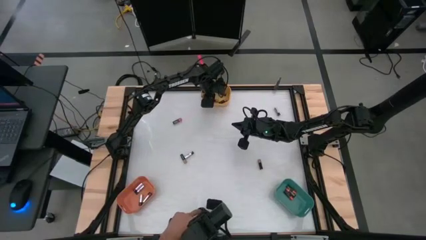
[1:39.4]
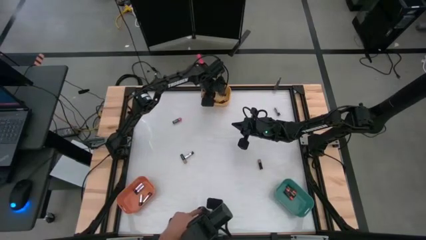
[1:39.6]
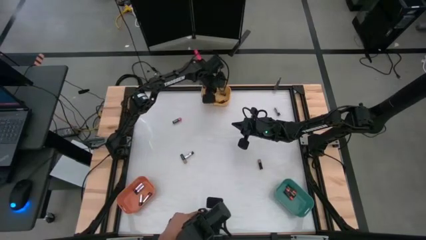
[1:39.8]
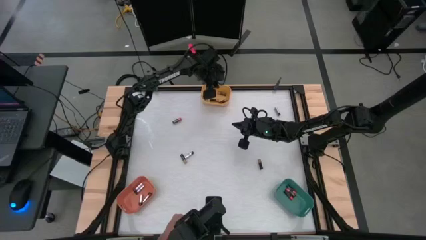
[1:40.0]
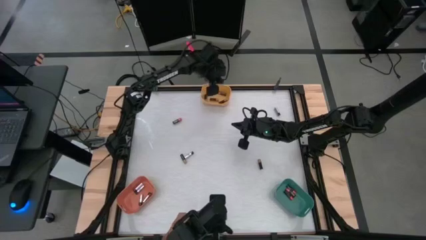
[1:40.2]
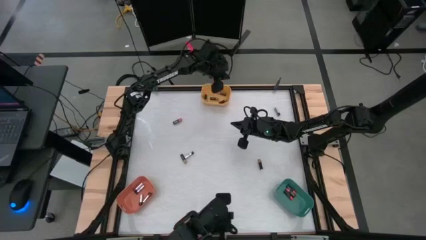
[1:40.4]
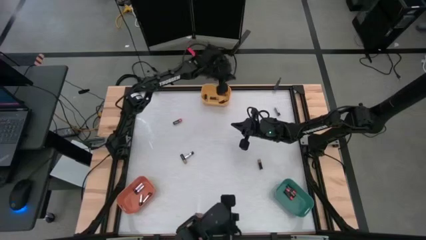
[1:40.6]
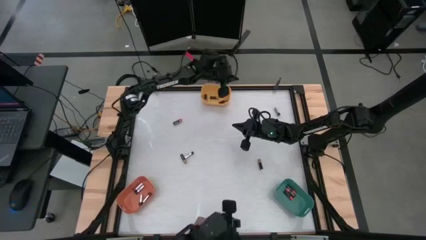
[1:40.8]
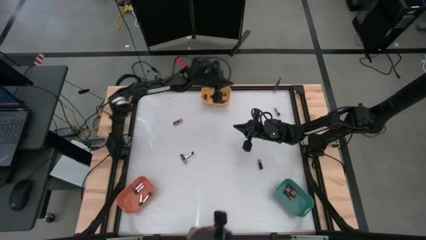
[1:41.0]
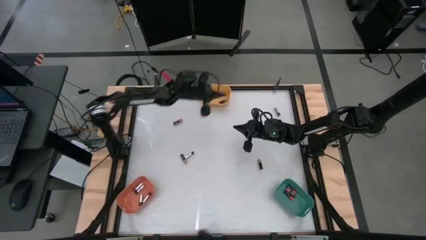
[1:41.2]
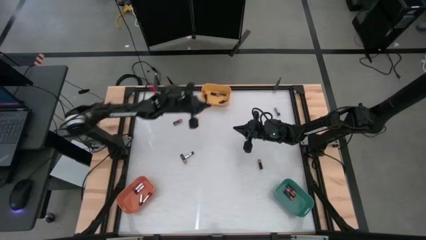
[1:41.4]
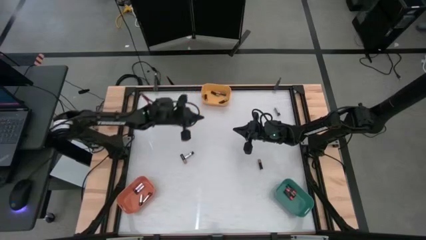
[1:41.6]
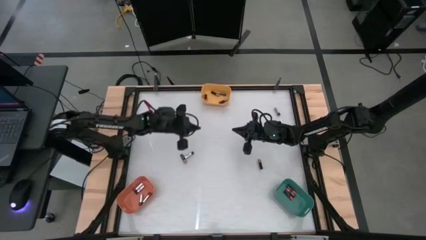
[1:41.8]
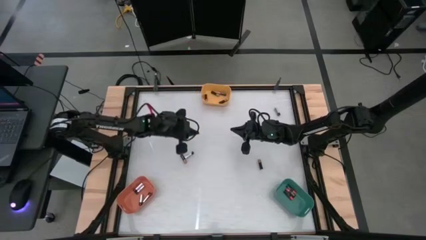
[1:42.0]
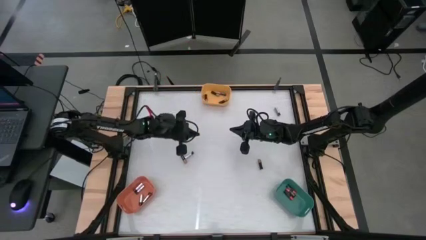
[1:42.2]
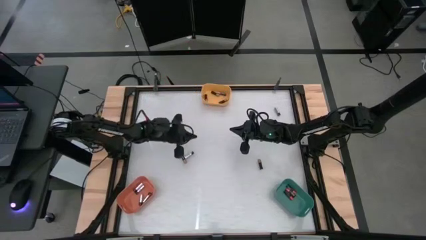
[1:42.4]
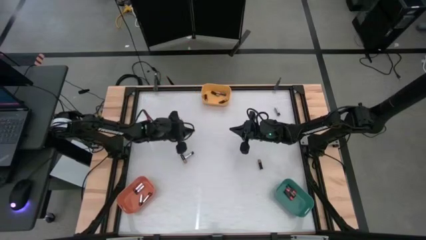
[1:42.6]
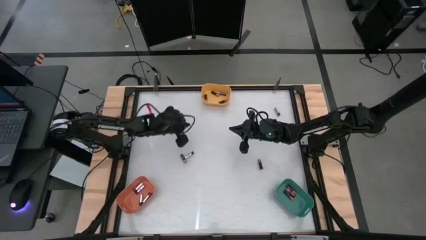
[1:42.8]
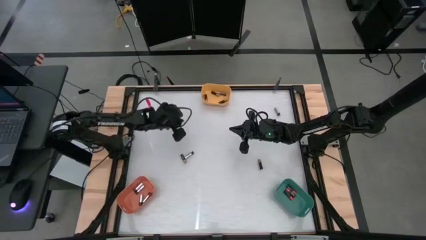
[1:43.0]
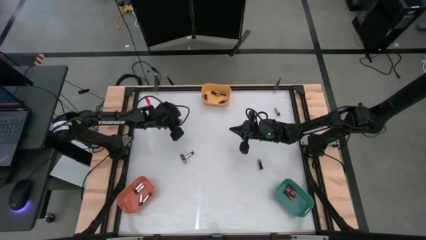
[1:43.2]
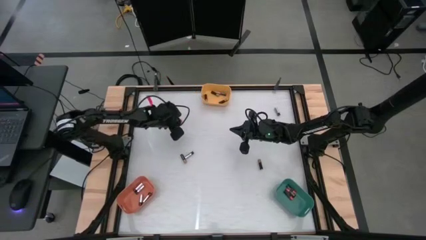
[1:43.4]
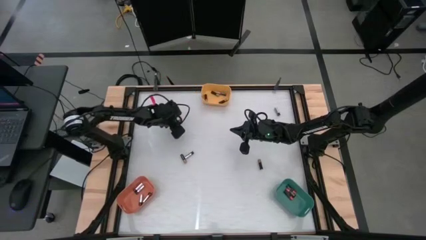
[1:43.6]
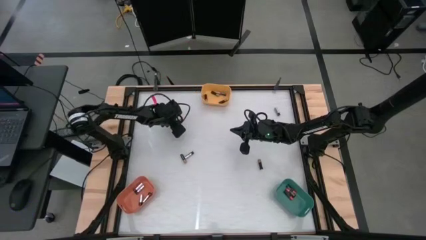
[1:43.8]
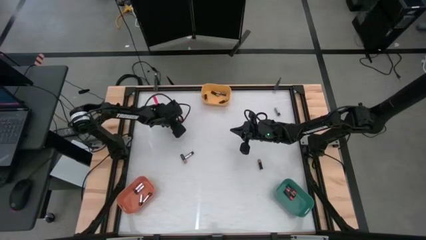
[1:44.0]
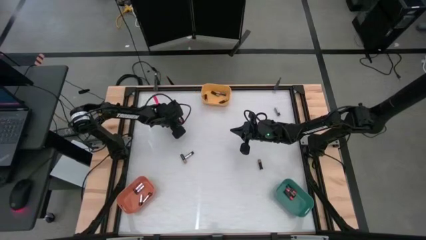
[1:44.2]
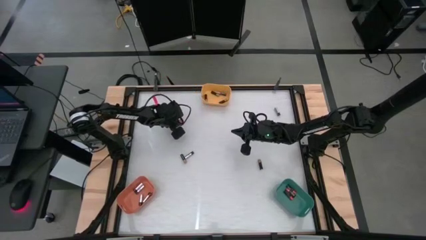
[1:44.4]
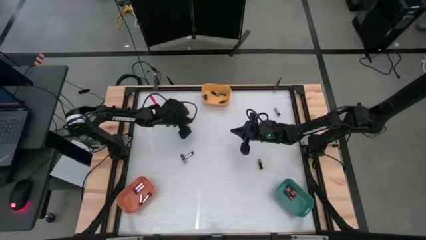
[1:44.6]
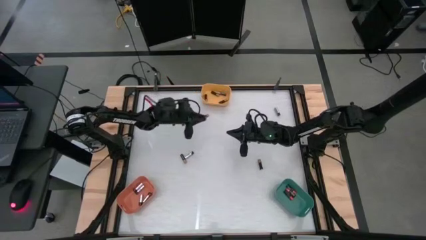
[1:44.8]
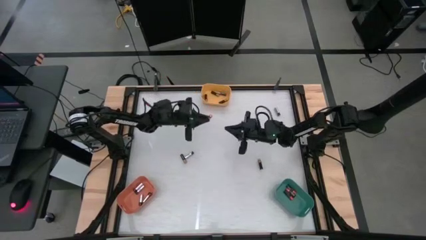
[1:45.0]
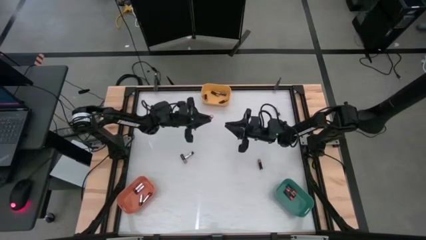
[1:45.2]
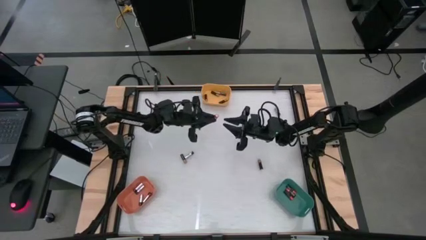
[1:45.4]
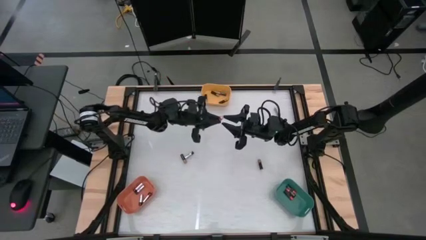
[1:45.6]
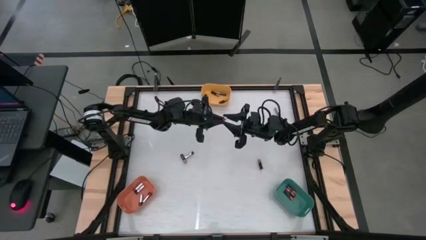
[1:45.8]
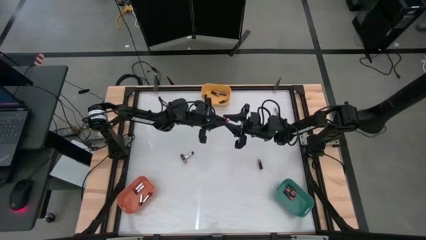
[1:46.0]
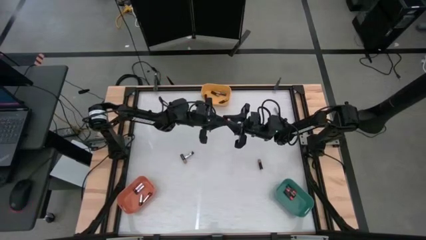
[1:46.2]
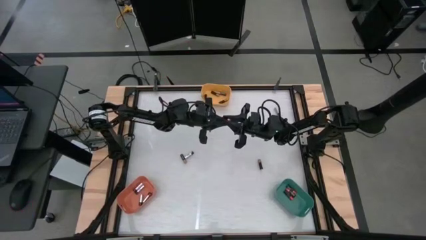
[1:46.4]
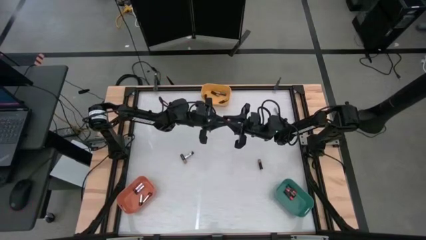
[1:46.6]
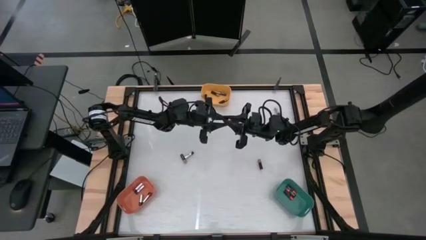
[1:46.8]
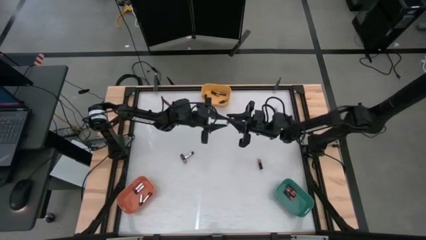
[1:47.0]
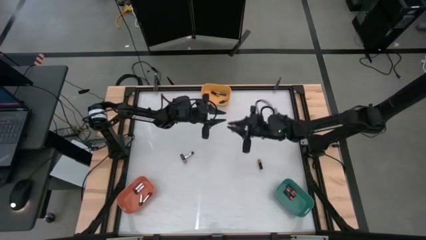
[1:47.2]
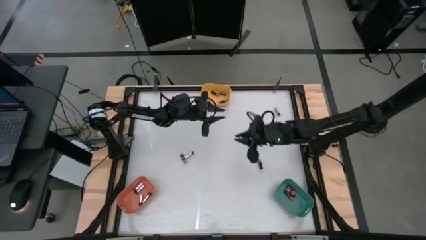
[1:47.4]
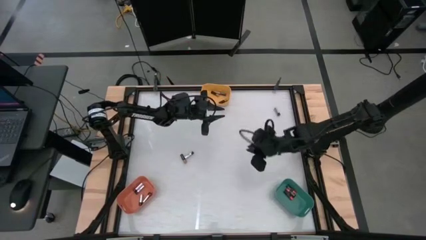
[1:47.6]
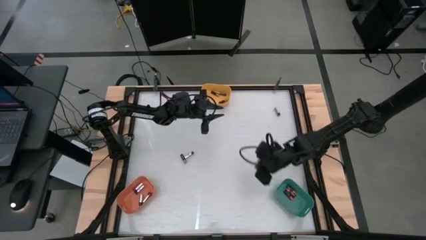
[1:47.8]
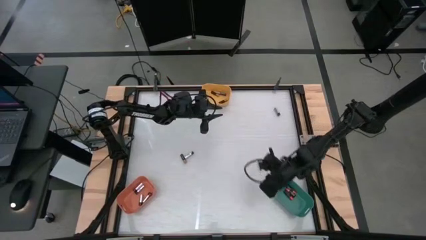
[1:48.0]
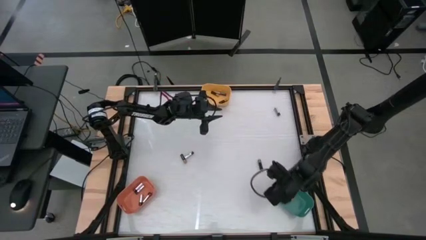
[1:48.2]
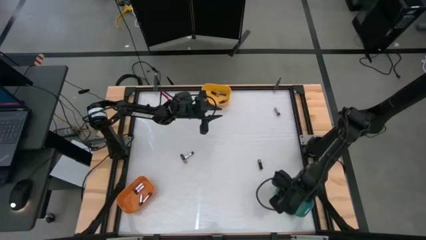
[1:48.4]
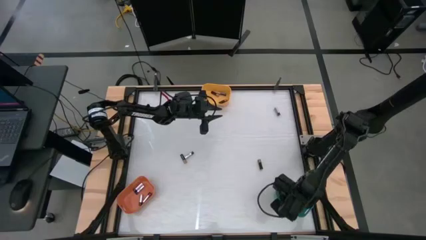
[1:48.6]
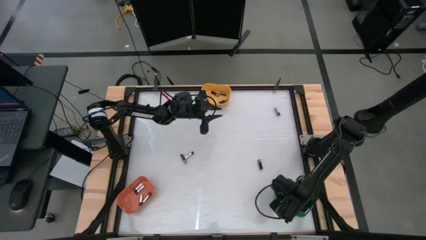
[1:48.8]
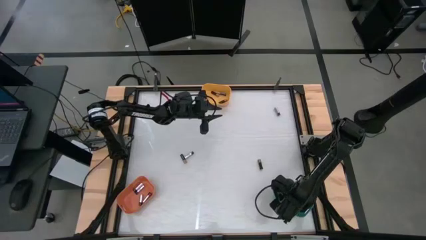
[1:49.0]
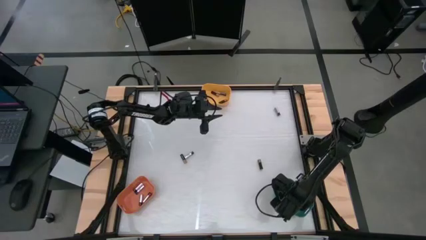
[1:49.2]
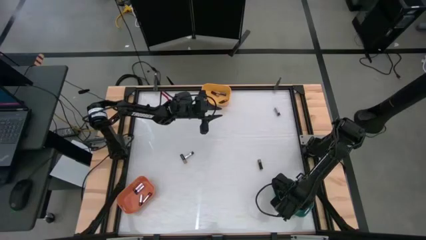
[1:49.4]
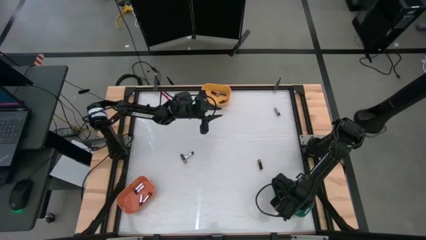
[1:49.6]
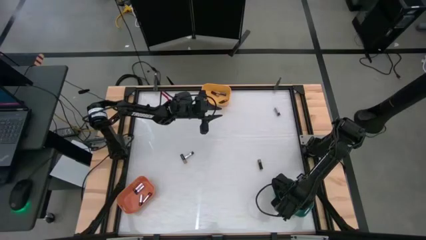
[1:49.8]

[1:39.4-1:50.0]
Task: Sort batteries
Put the black-red battery into the green bin

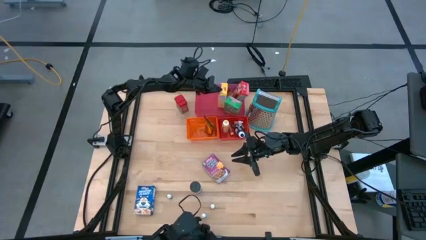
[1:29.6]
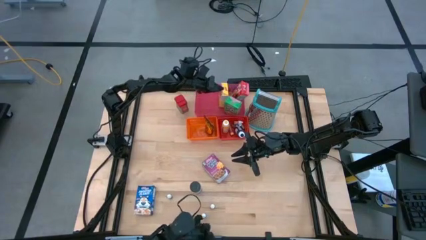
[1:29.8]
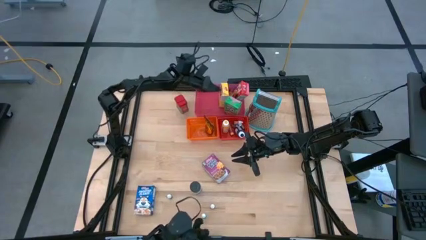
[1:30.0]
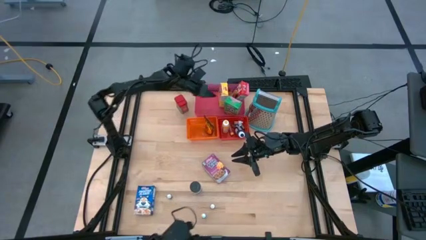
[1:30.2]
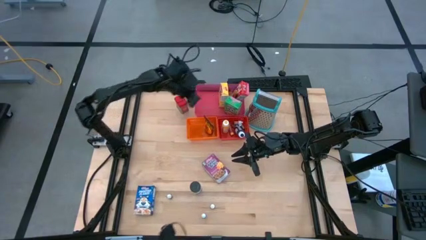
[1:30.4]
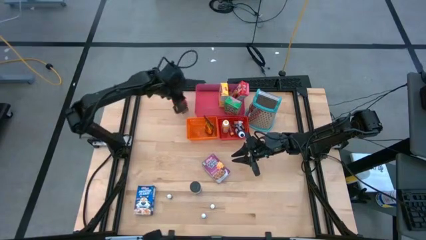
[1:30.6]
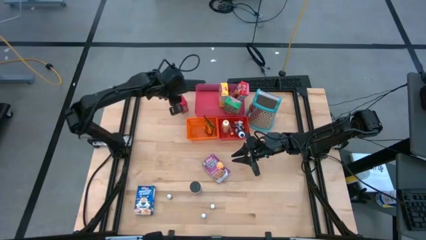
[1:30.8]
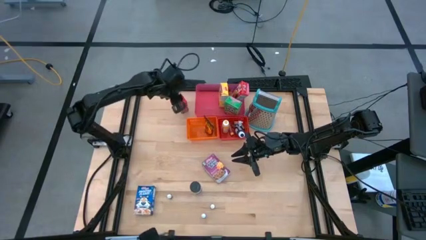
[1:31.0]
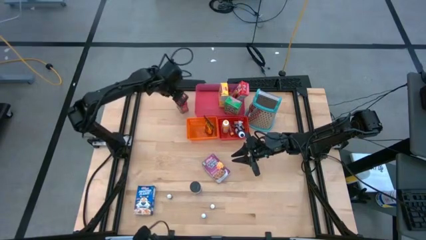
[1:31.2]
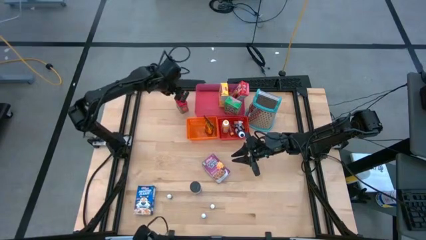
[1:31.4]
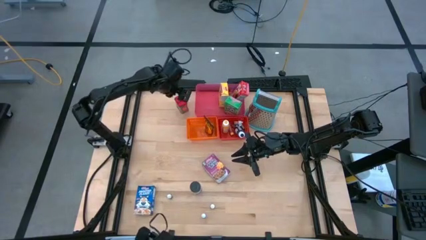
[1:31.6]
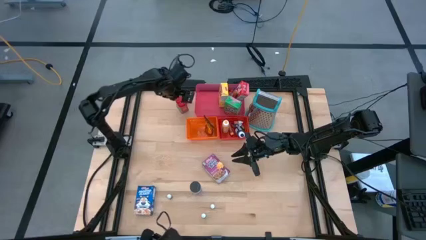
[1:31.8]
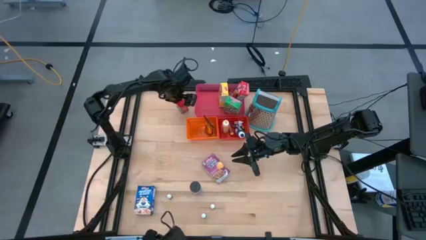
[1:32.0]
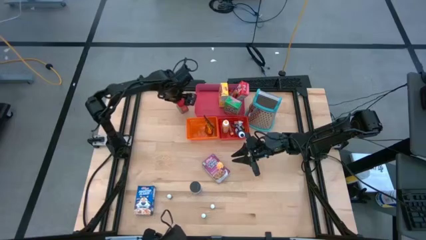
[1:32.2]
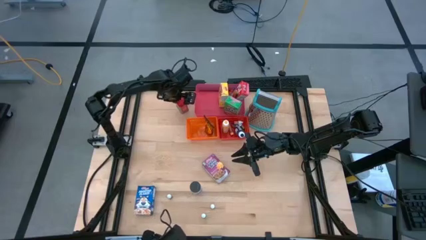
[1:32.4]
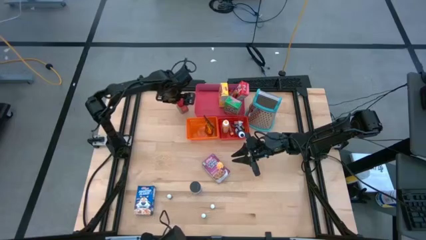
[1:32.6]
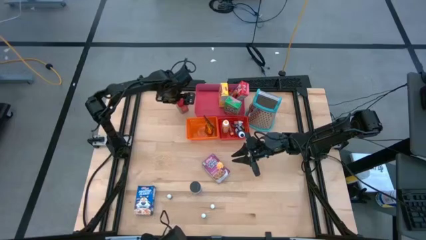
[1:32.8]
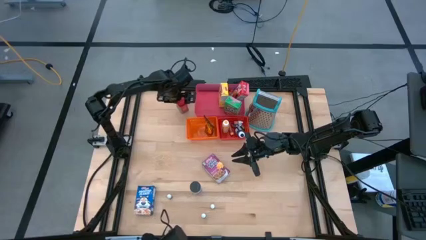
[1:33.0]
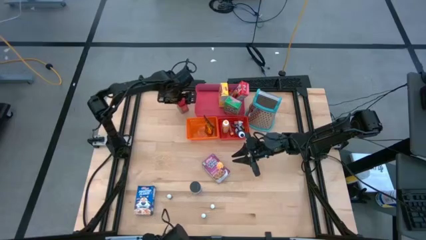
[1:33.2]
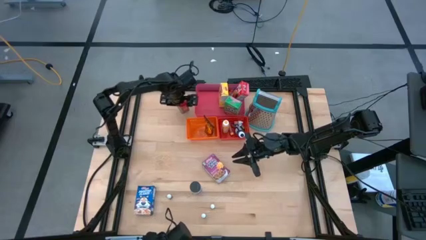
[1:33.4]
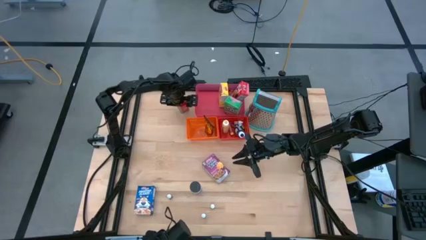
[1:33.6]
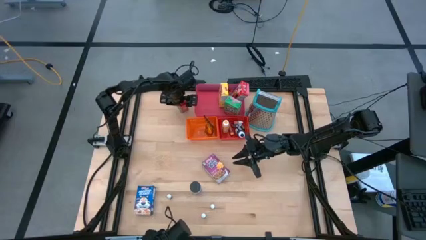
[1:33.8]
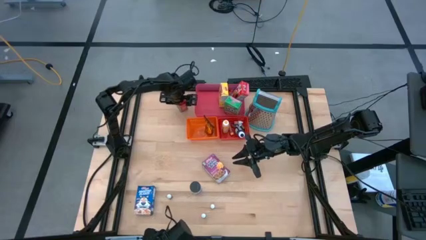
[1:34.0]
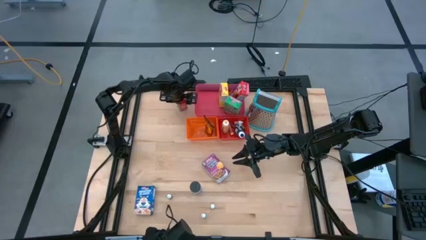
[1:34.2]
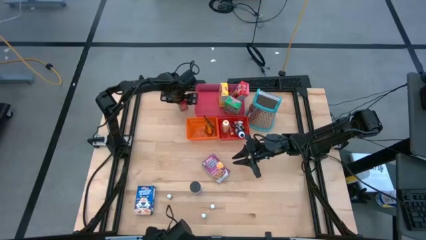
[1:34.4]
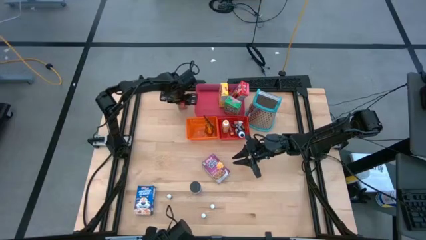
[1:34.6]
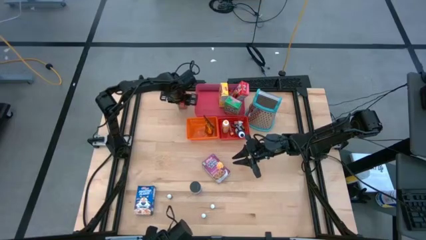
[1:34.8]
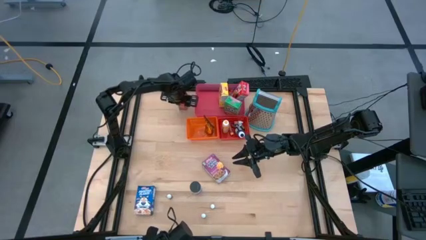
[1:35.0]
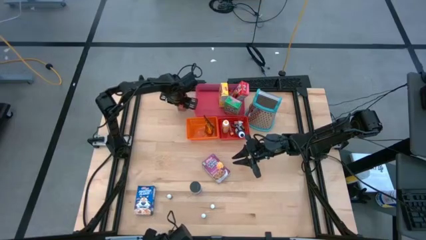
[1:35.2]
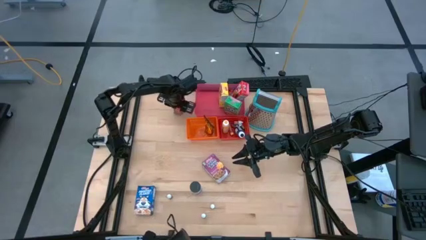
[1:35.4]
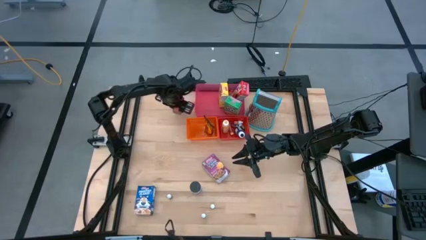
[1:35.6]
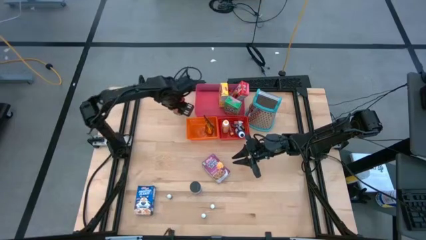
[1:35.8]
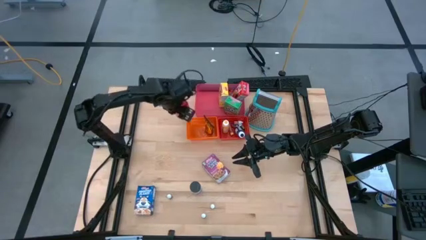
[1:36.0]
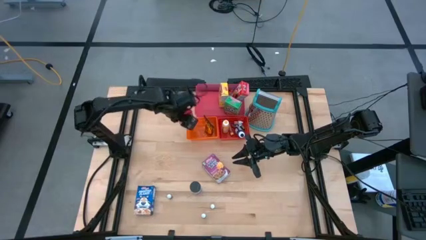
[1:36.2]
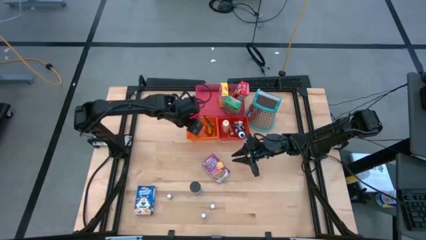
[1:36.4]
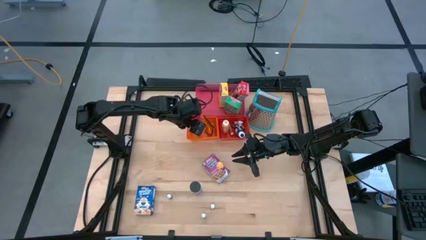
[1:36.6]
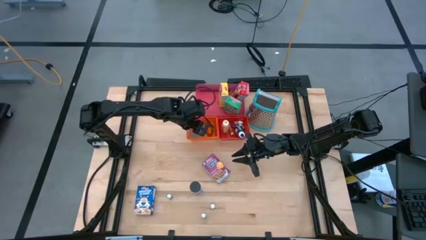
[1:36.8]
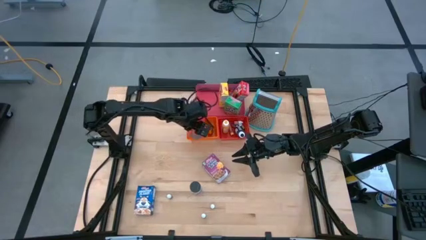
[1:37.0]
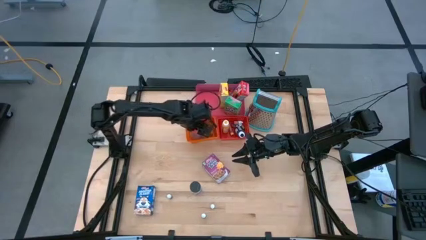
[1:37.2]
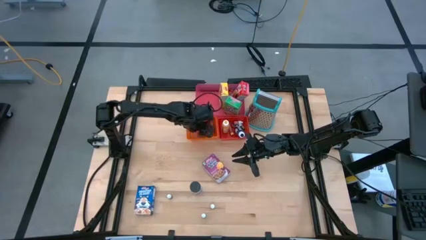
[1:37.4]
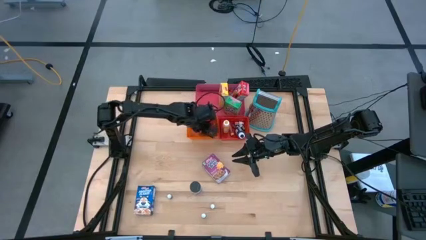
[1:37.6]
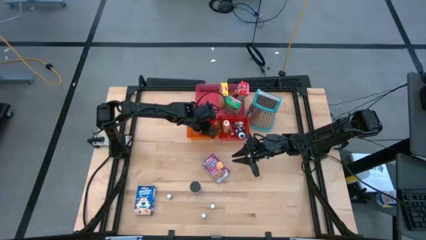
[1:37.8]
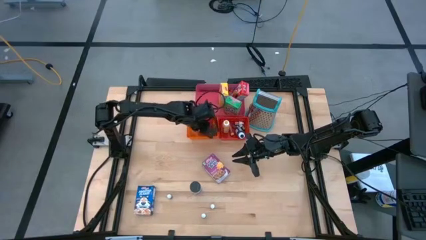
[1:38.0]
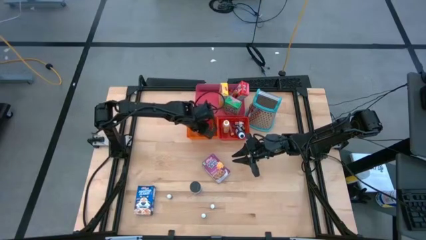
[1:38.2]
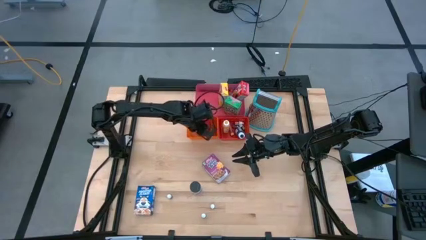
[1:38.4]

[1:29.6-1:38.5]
Task: Pick & Place Kitchen Items
Put the red seasoning can into the orange bin
